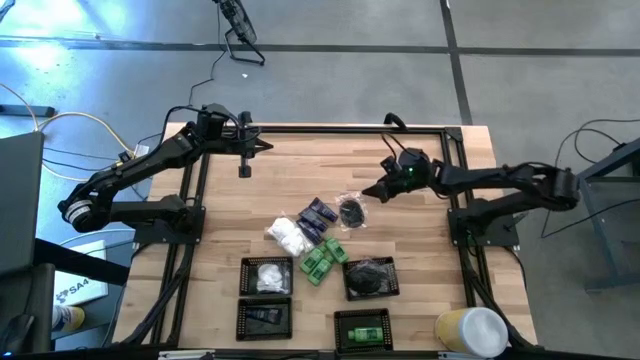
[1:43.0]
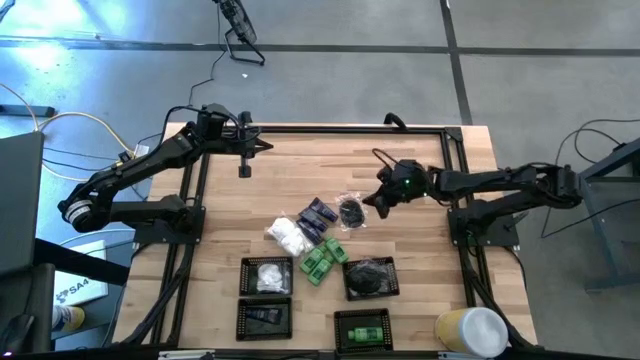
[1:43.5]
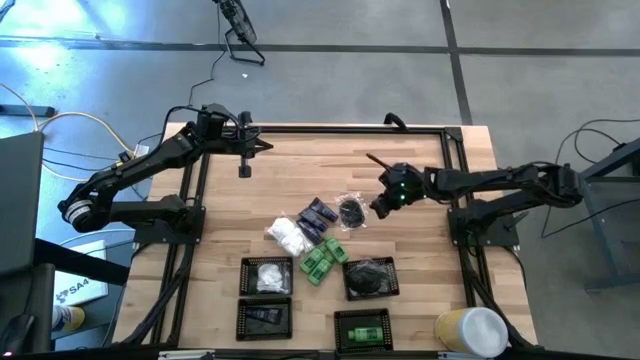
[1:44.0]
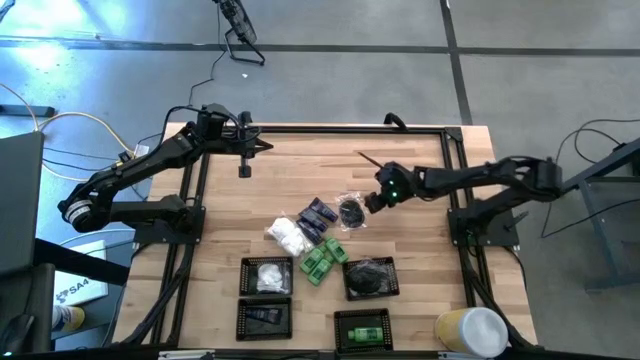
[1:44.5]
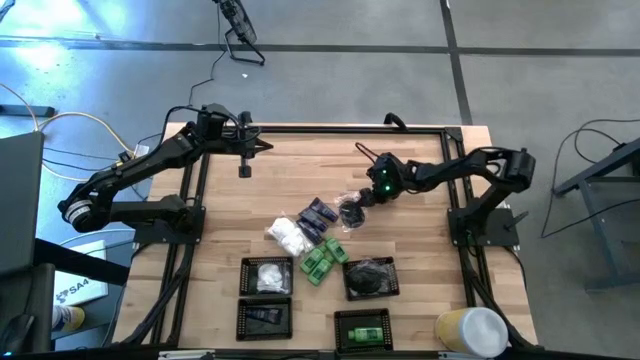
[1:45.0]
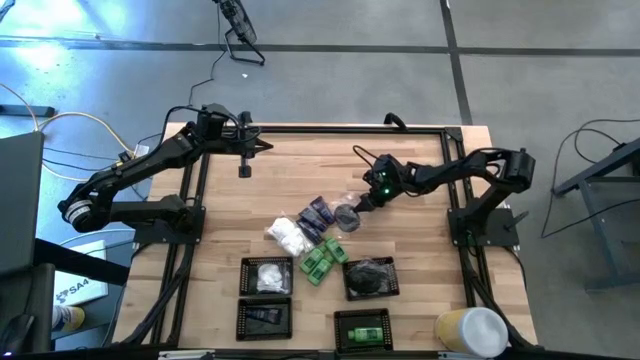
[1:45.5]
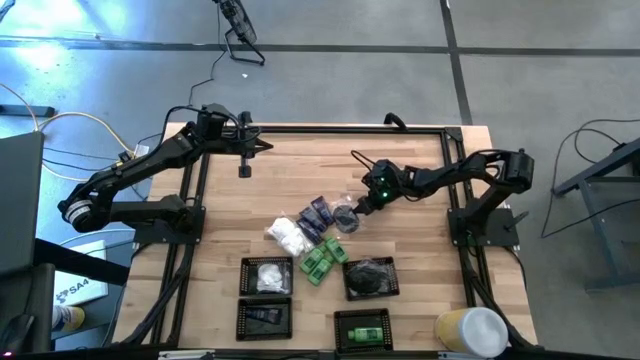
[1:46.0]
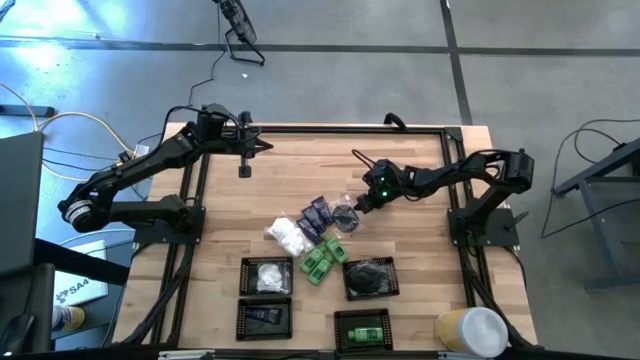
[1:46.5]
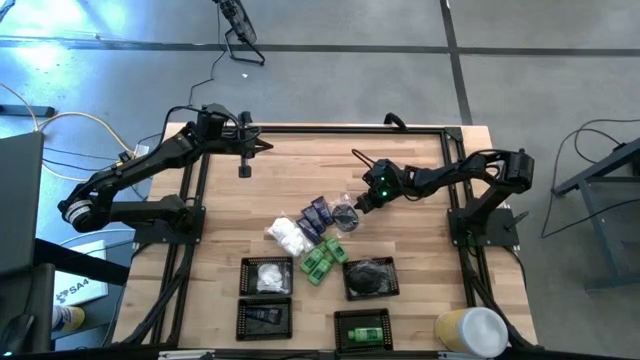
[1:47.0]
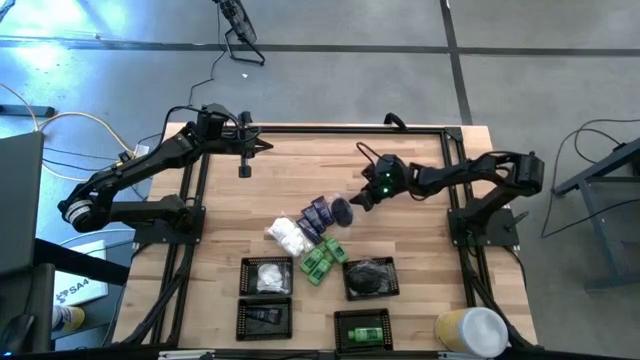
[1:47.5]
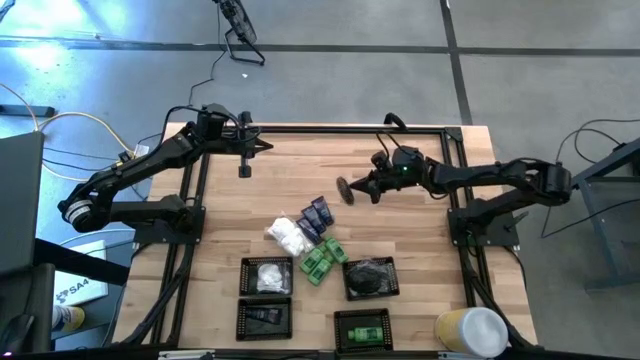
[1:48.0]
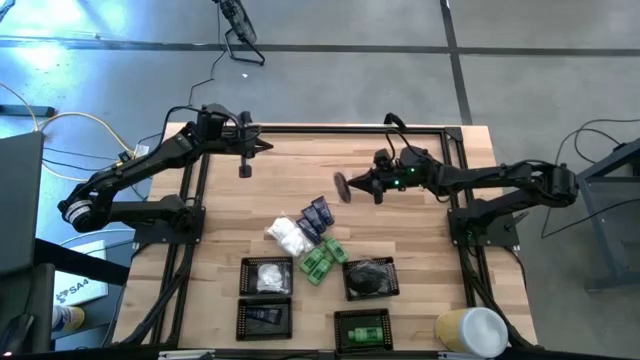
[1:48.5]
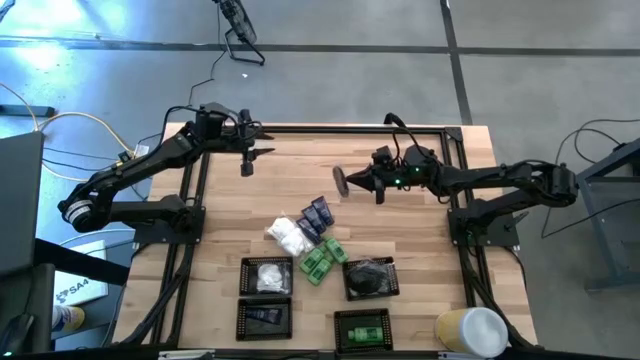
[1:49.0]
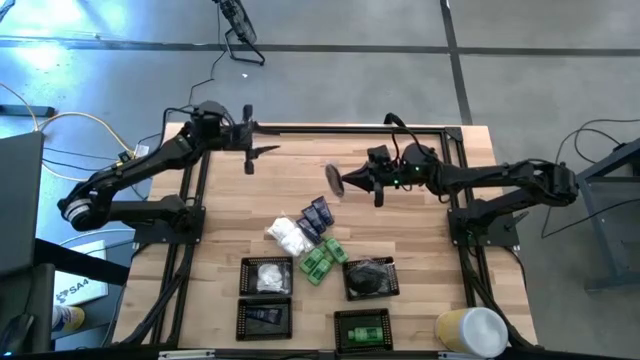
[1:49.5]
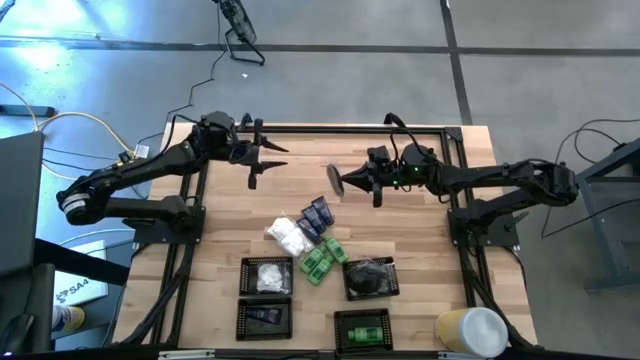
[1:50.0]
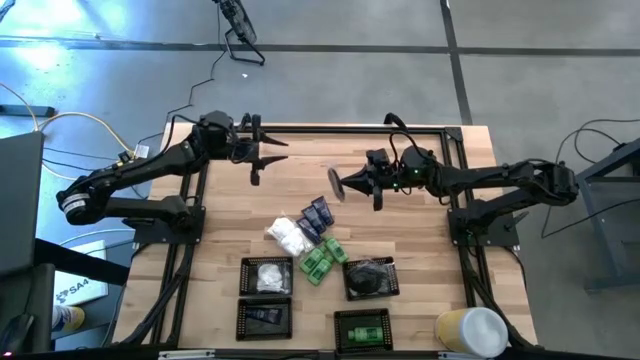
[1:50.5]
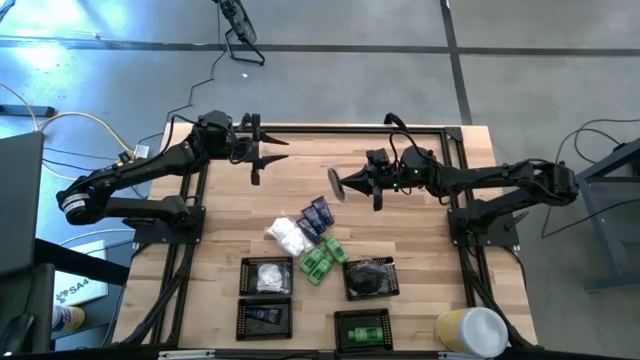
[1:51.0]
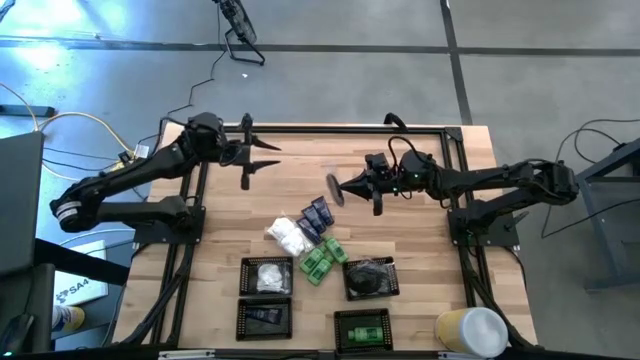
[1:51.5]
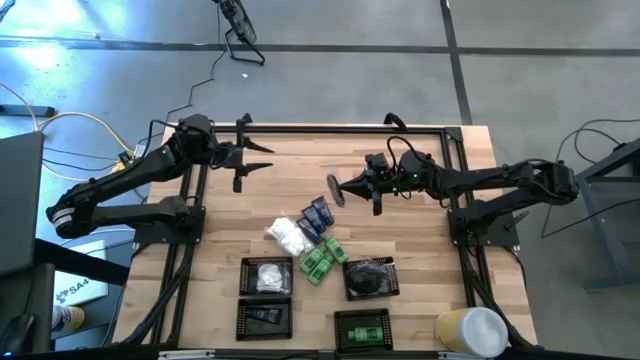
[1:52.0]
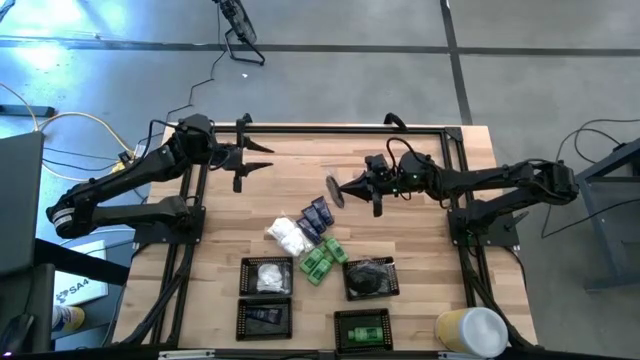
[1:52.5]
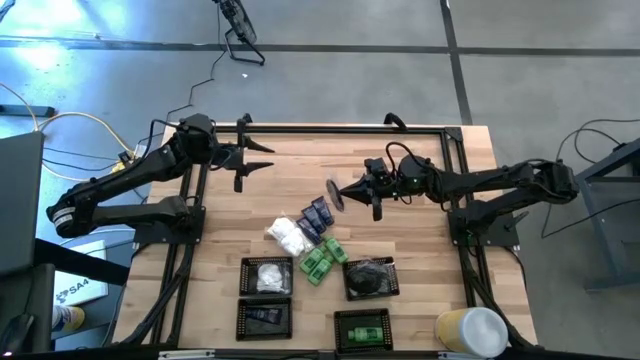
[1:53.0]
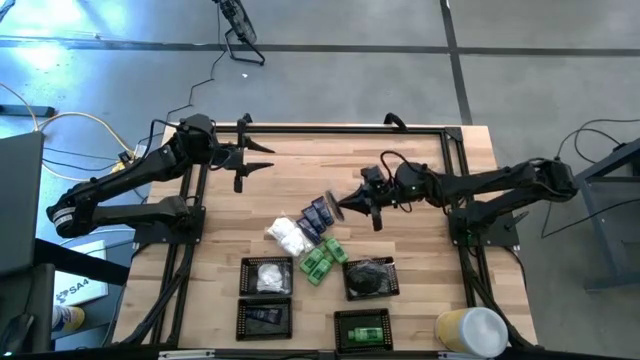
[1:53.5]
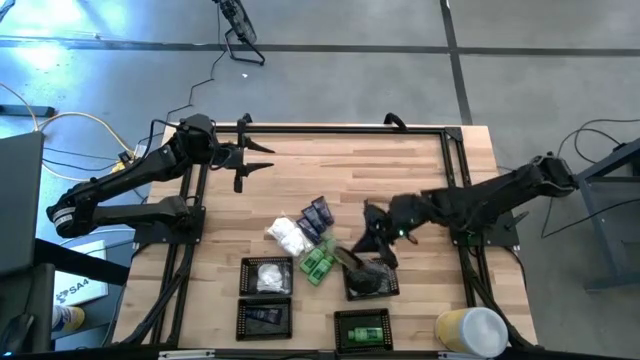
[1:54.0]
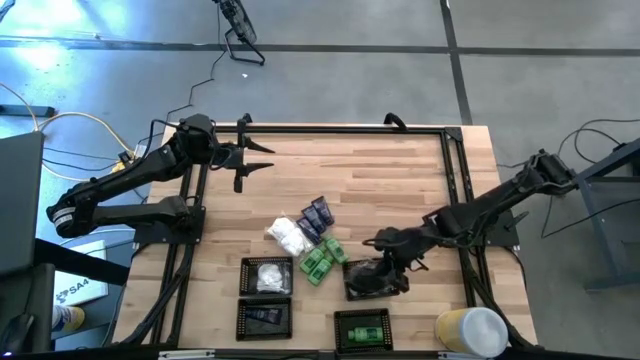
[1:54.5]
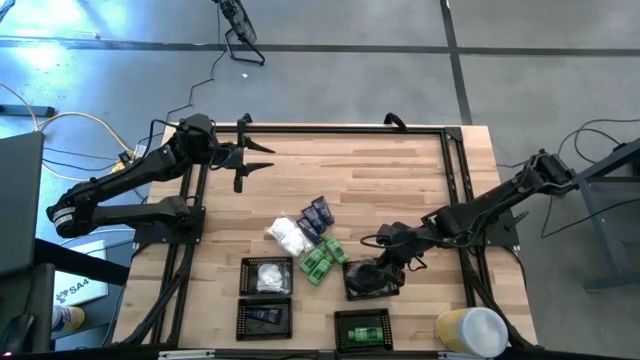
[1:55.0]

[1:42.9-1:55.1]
Task: Pick & Place Travel size toiletries
Put the black hairbrush into the top right black bin

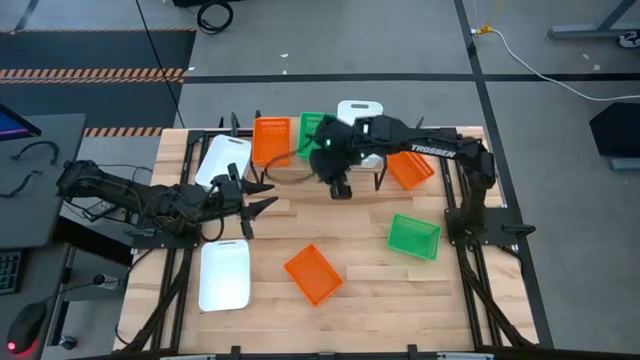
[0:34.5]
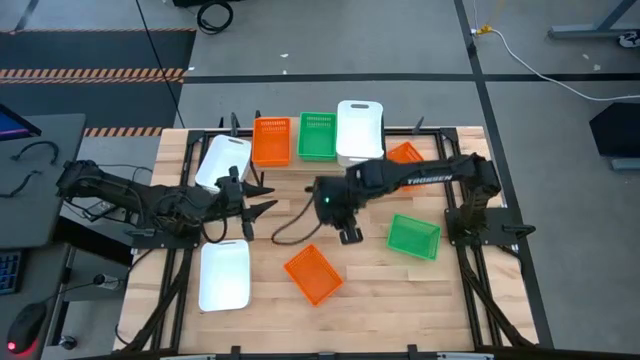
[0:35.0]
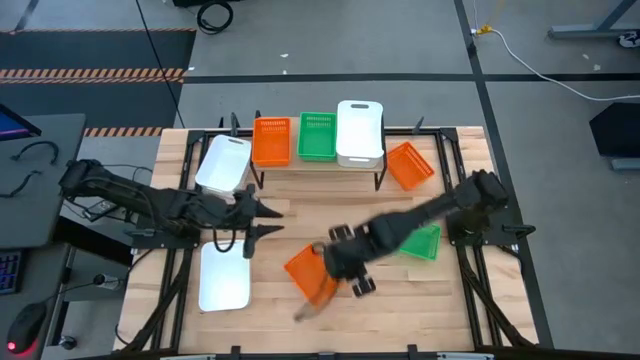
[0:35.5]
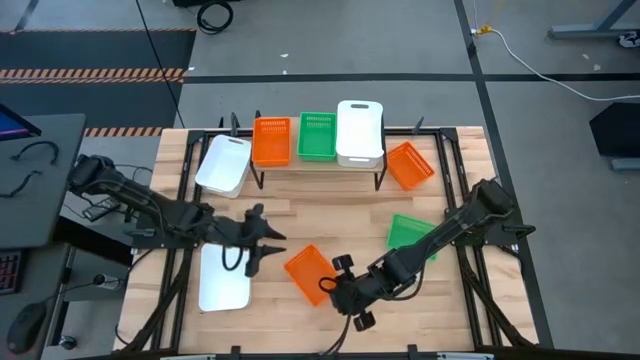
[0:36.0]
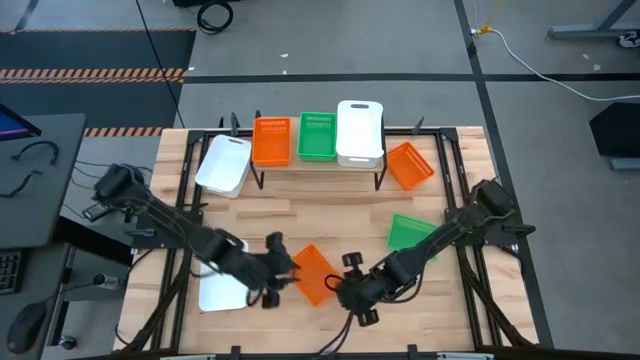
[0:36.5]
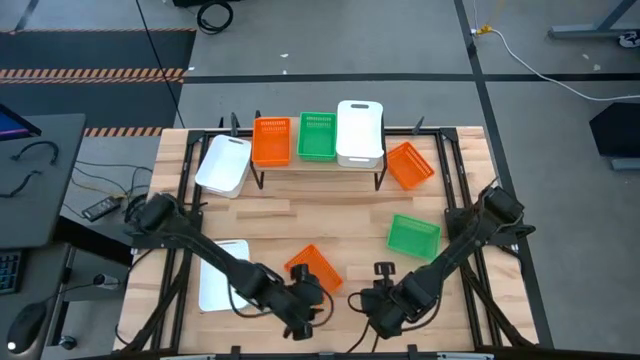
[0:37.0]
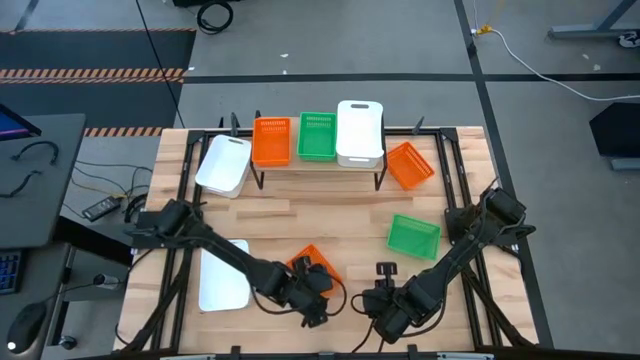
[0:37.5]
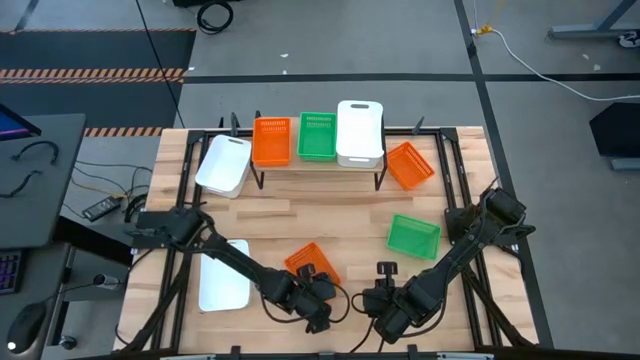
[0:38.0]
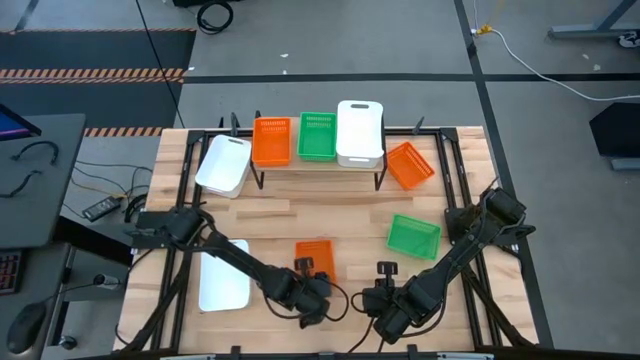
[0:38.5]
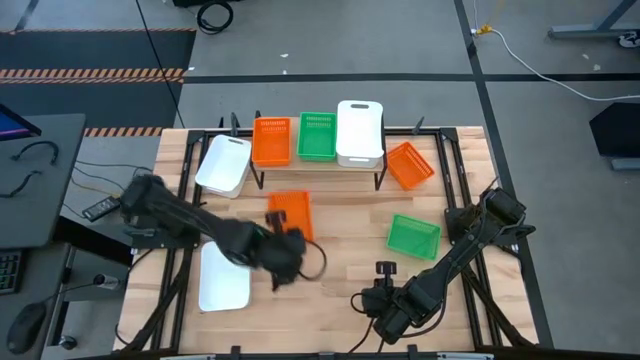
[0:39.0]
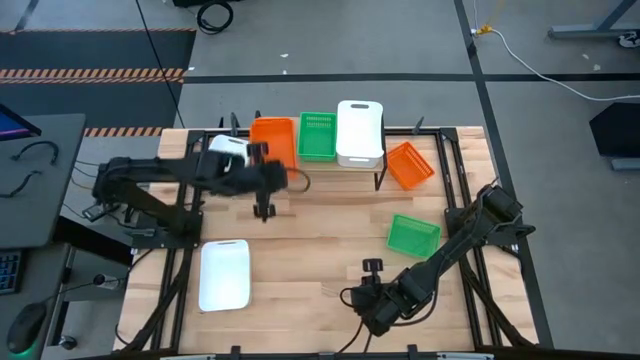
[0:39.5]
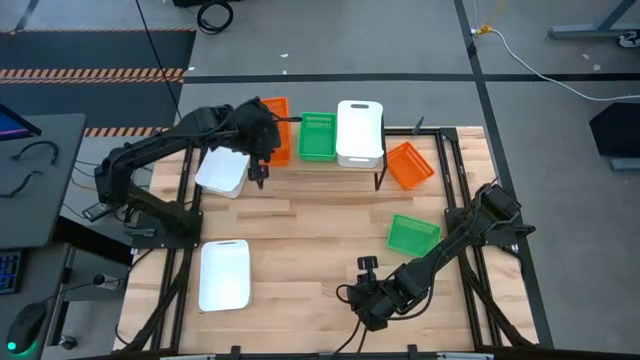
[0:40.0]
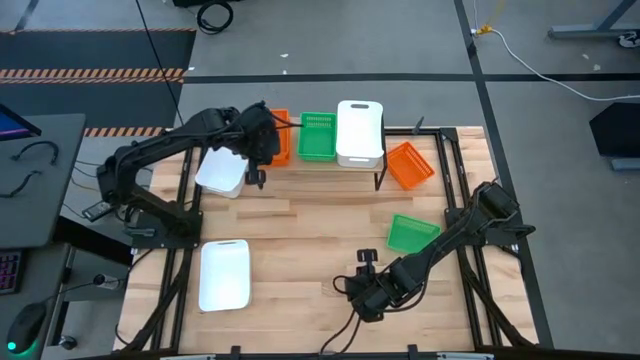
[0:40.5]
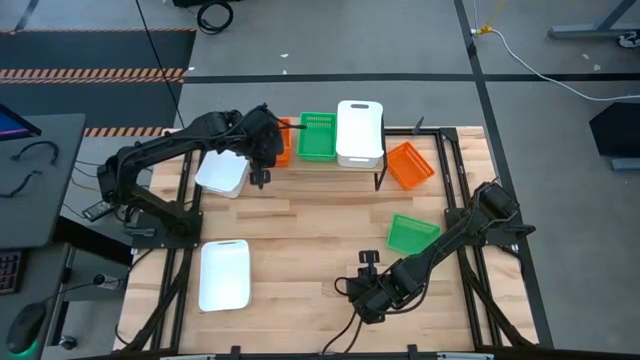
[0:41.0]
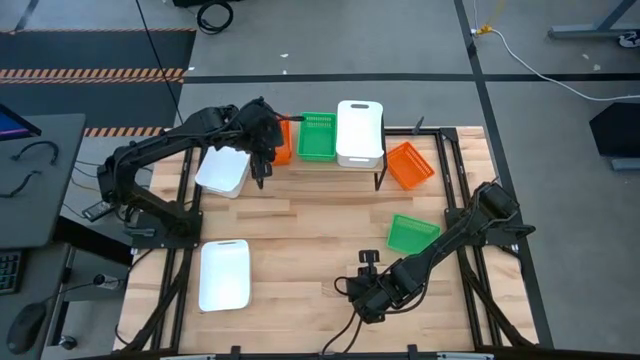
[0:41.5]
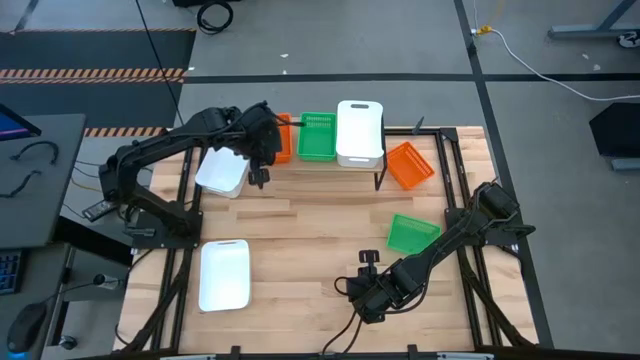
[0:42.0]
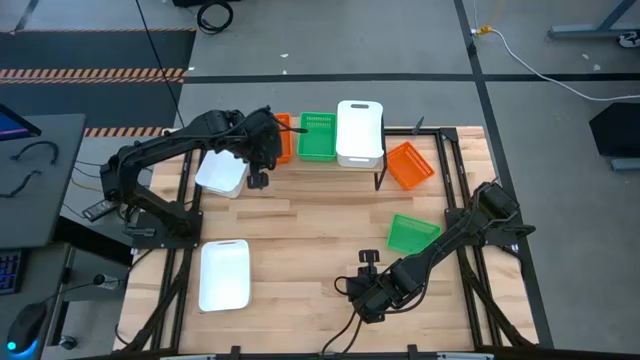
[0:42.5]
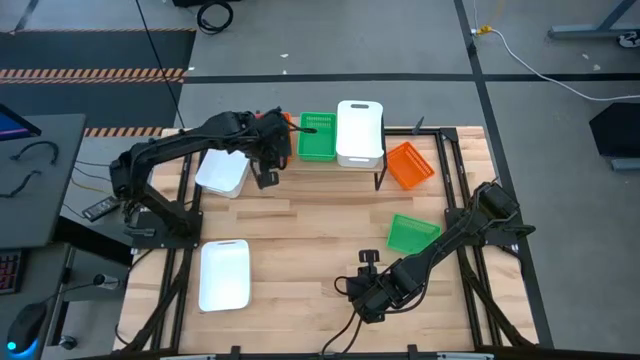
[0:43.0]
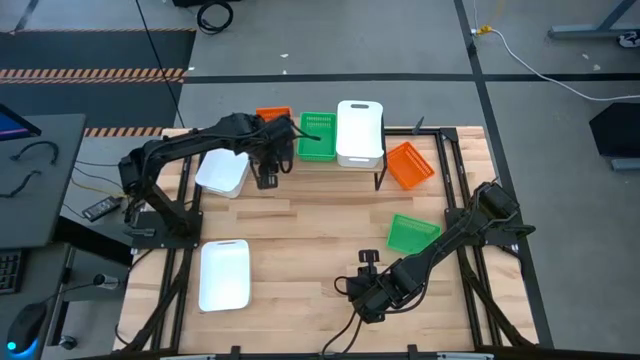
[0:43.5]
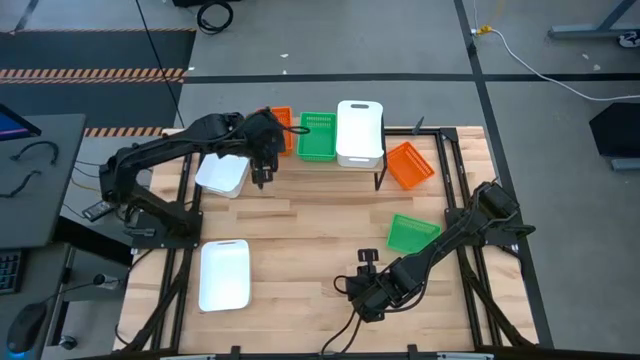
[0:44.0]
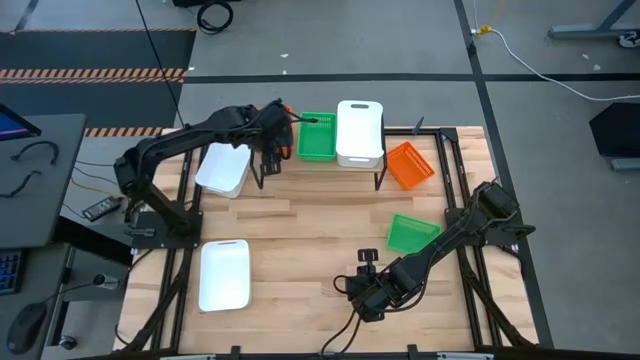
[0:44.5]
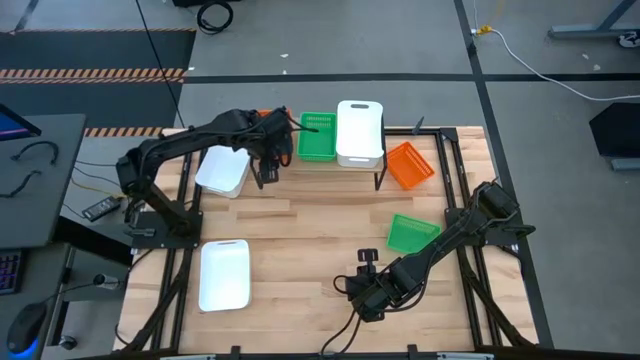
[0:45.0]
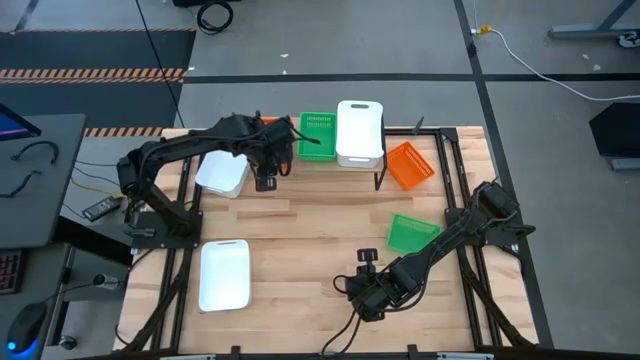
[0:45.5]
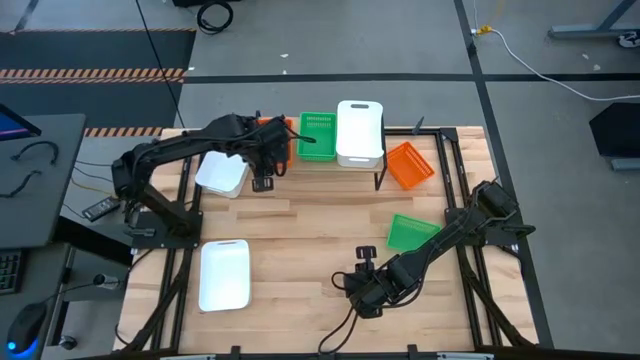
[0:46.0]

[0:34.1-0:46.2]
Task: Stack baskets on shelf by color
Stack the bottom orange bin on top of the orange bin on the shelf
